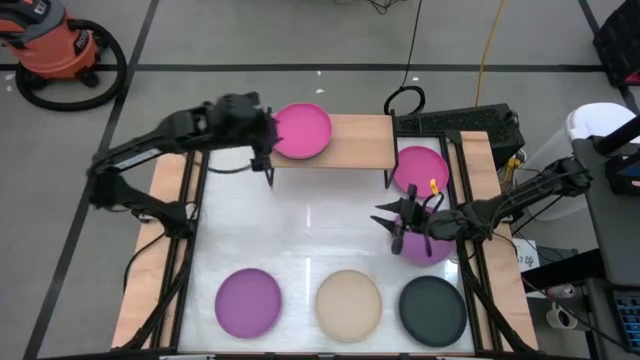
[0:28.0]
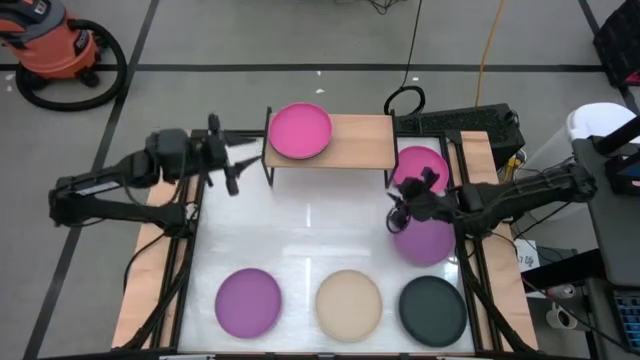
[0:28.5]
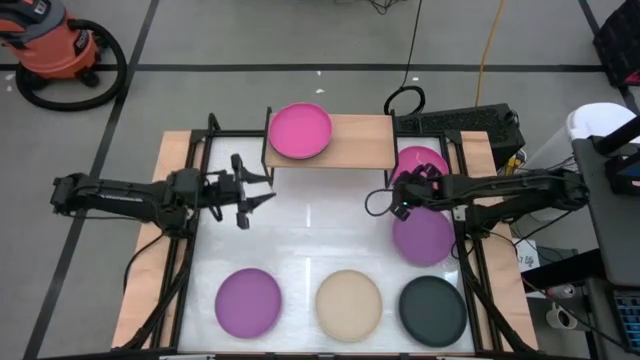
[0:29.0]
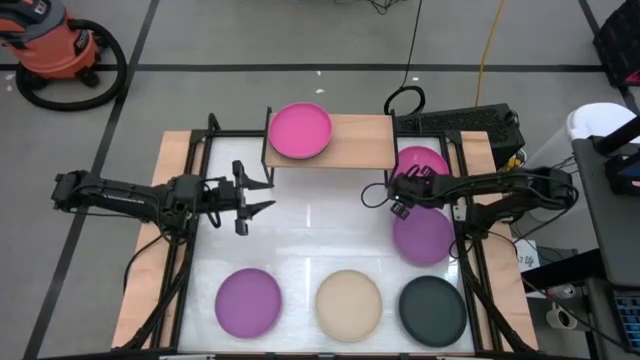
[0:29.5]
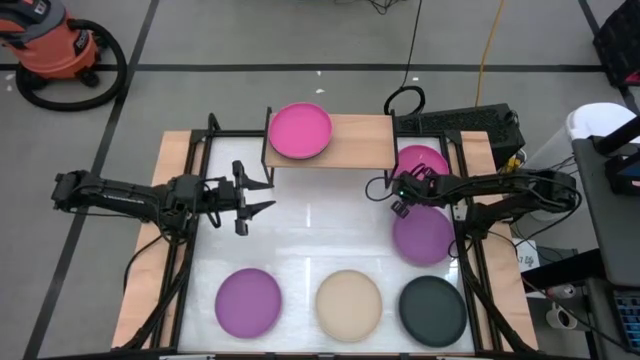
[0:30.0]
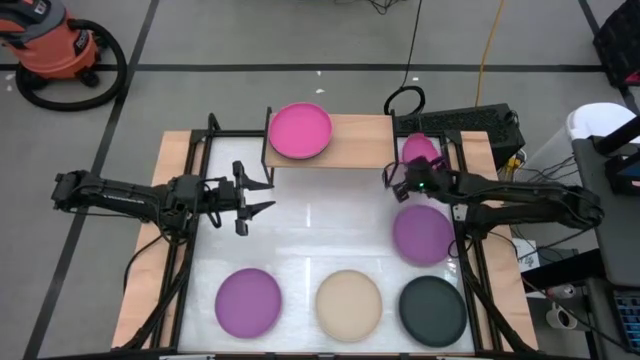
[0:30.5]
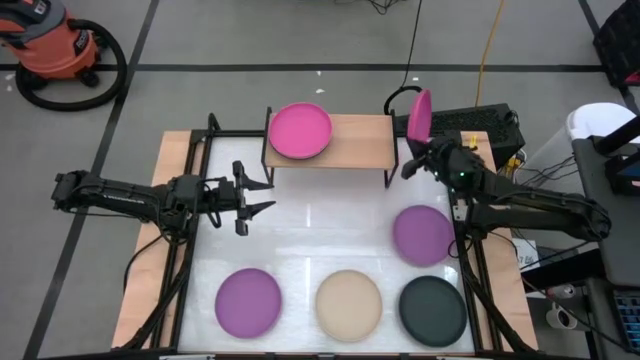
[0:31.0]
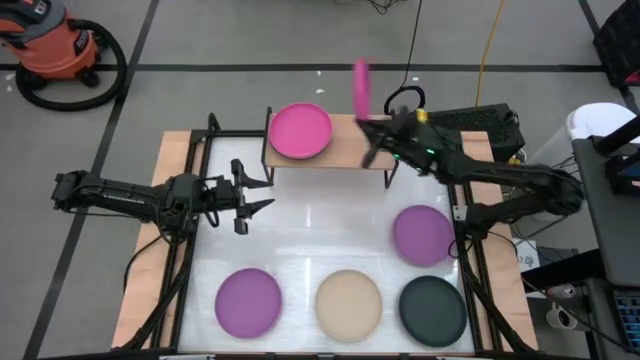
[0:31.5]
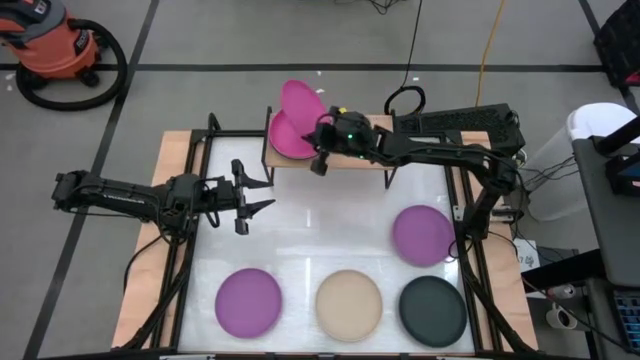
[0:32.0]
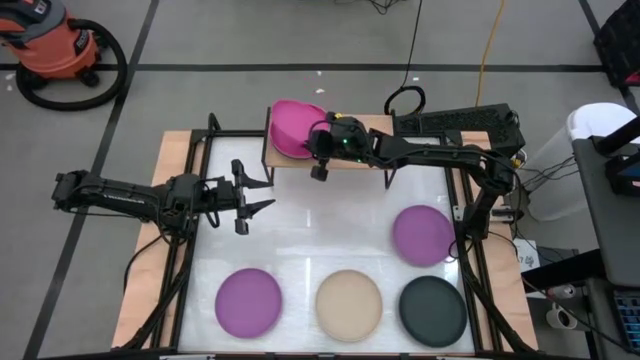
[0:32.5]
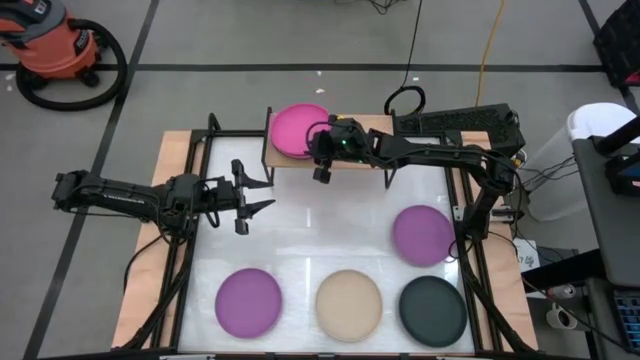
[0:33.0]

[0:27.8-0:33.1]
Task: Place and stack plates onto a shelf
Stack the pink plate on top of the pink plate on the shelf

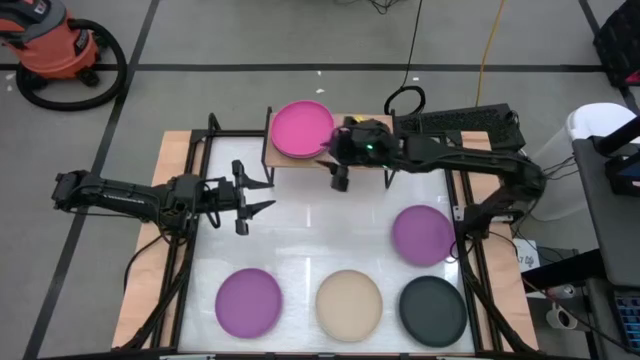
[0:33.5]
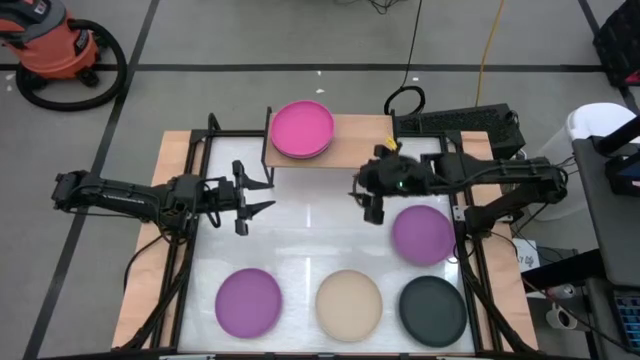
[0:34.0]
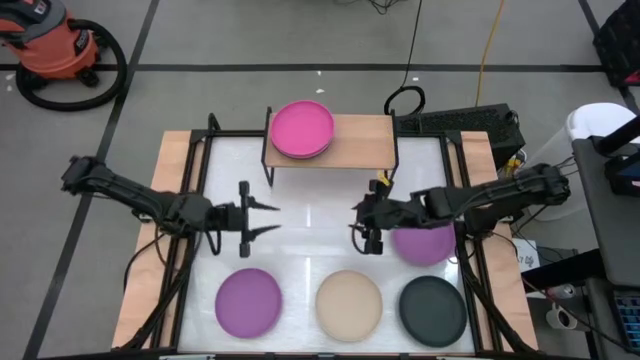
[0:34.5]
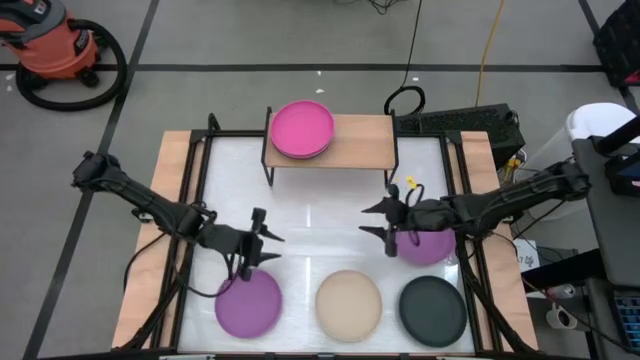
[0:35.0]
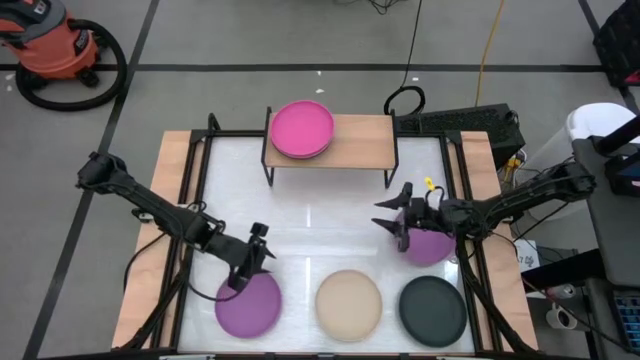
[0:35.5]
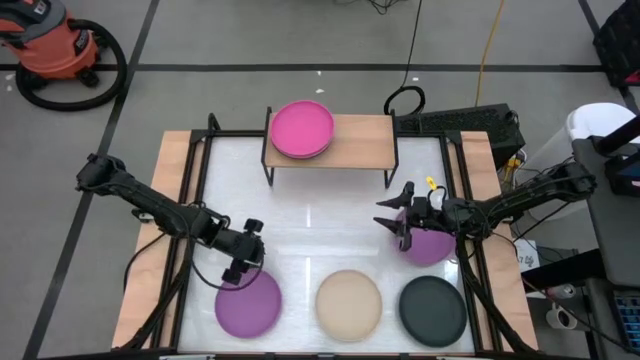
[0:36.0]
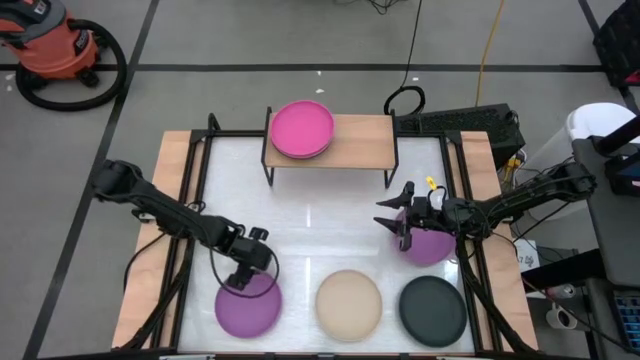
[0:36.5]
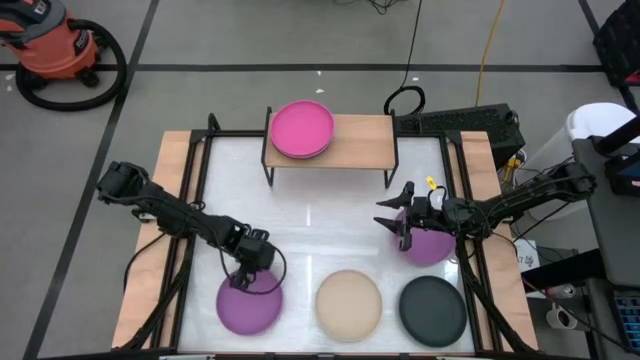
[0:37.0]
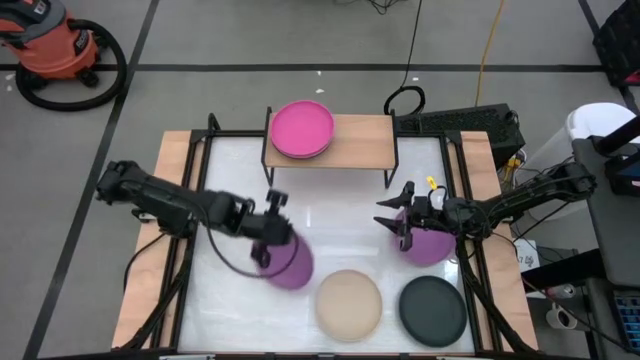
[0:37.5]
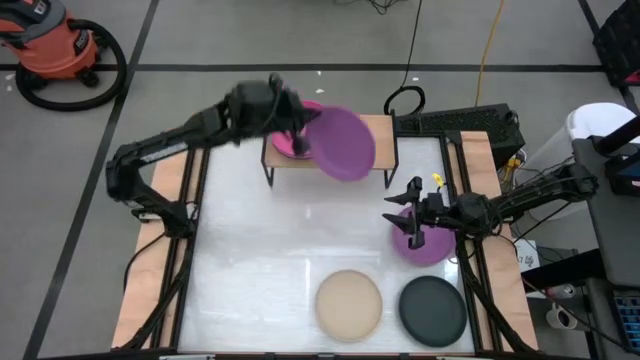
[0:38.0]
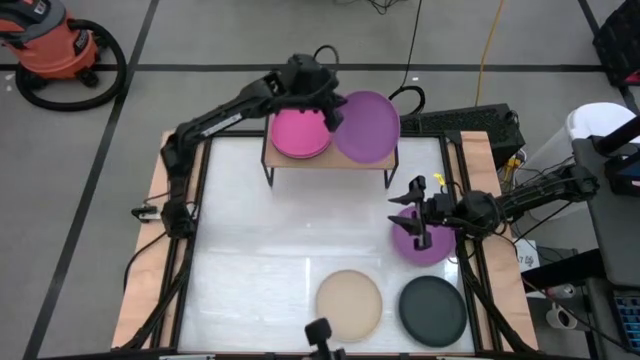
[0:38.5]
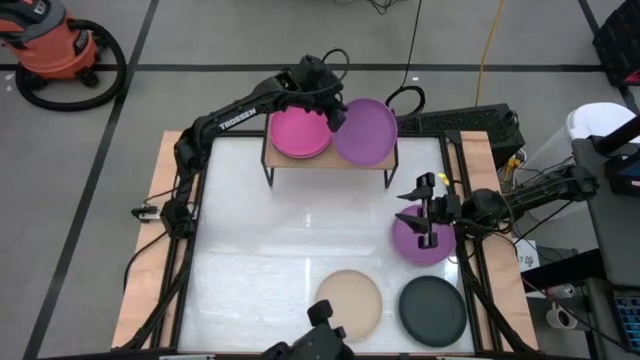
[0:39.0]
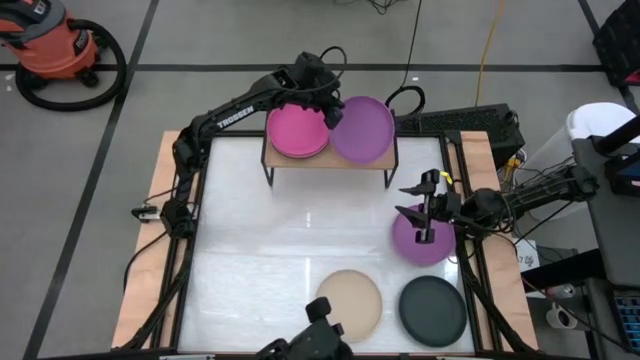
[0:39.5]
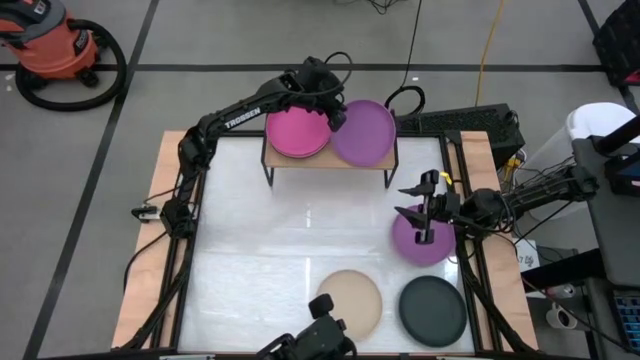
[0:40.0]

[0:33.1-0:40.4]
Put the bottom violet plate on the shelf

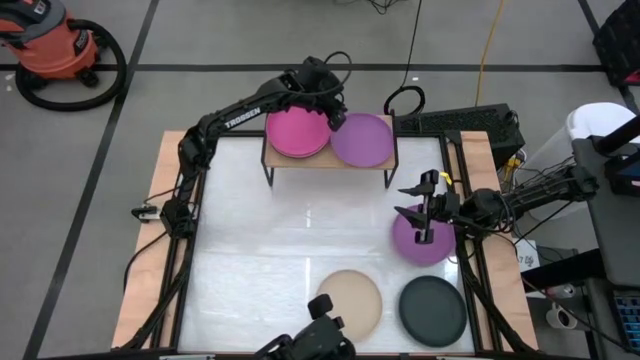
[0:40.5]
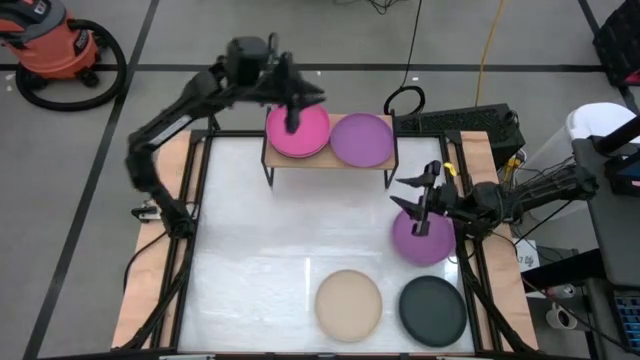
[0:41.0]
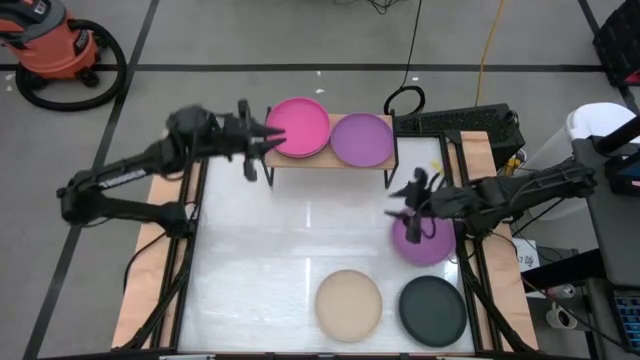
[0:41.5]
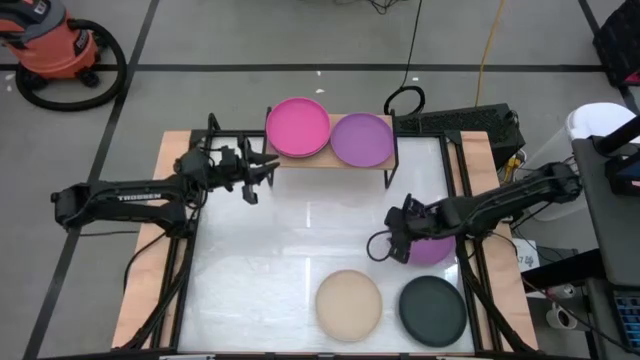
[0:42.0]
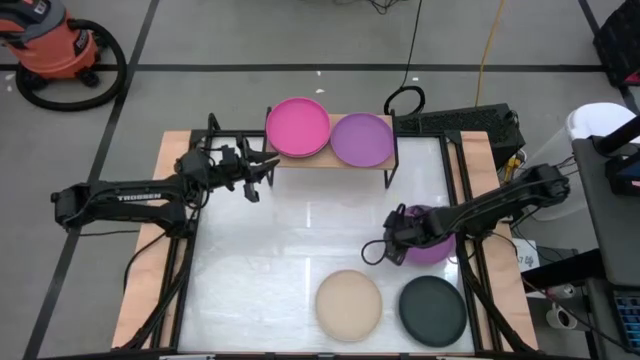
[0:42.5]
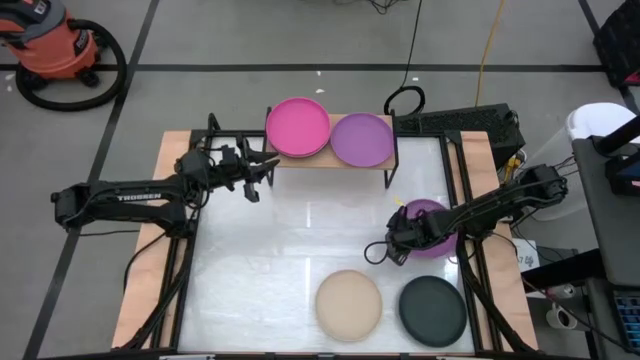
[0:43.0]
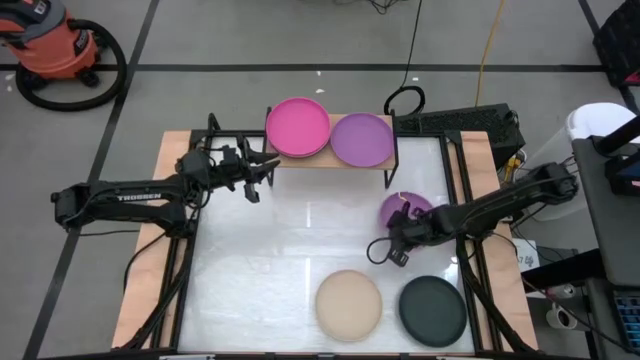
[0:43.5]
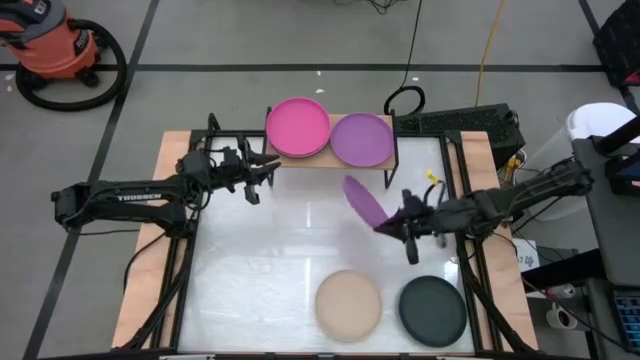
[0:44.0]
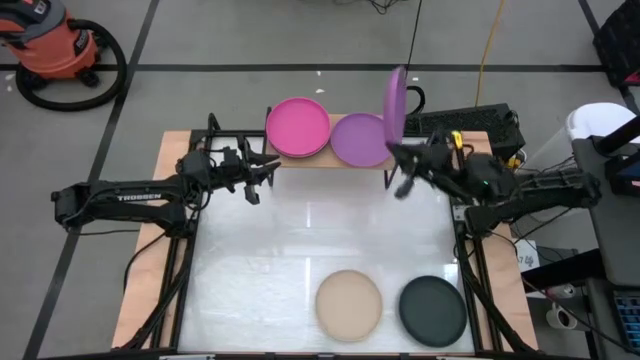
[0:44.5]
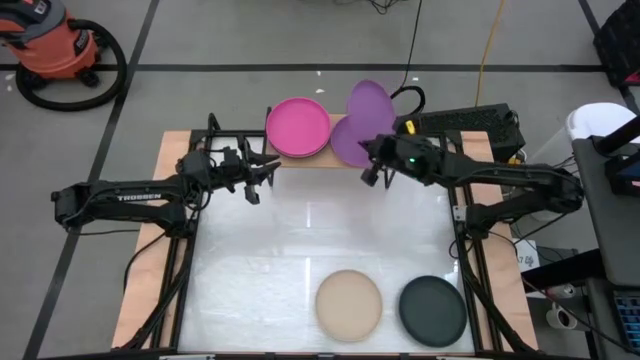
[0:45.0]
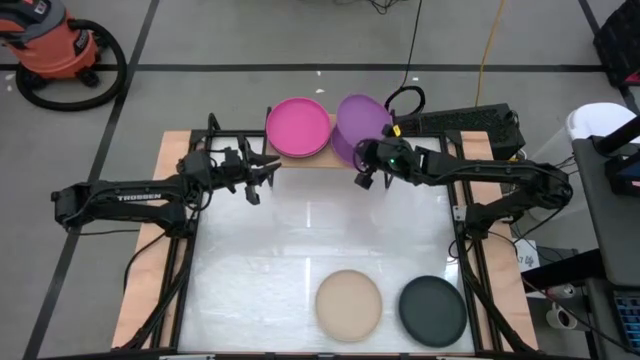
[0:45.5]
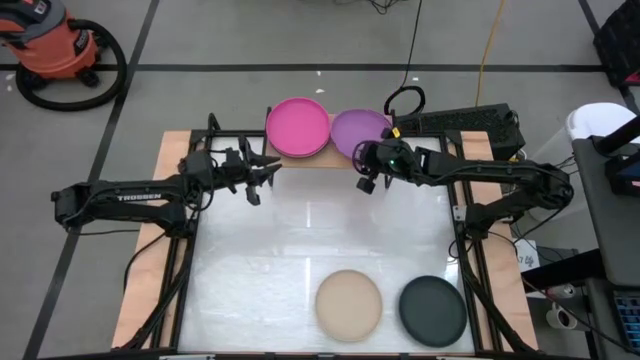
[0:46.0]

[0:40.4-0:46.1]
Stack the violet plate on top of the violet plate on the shelf

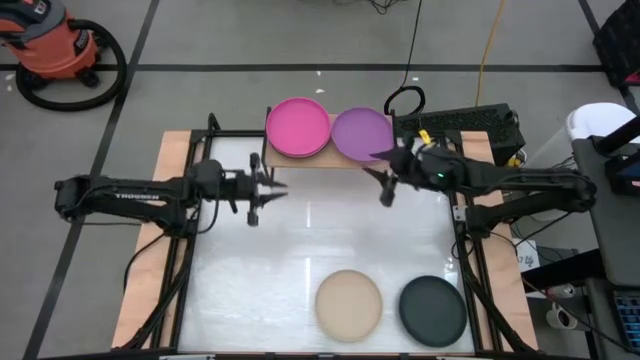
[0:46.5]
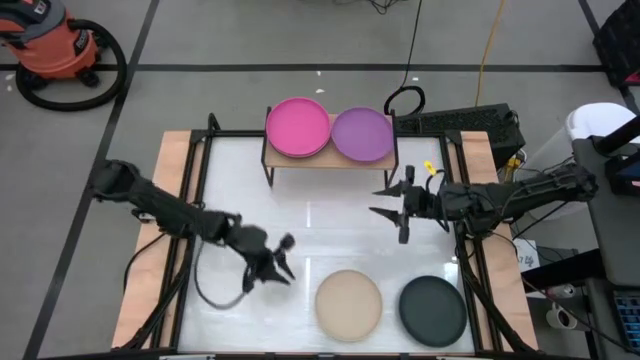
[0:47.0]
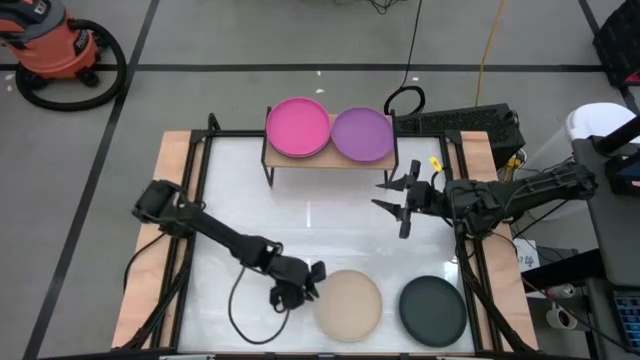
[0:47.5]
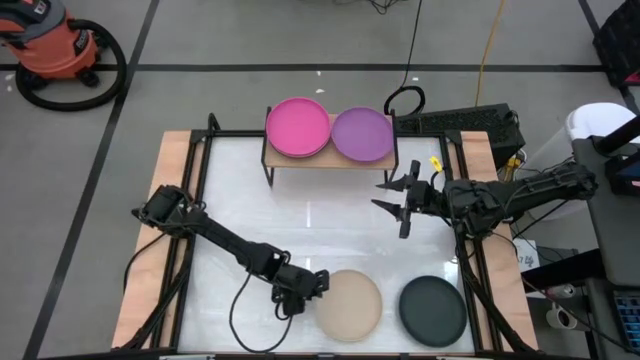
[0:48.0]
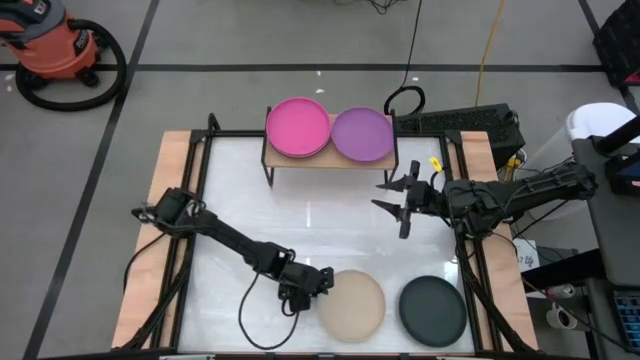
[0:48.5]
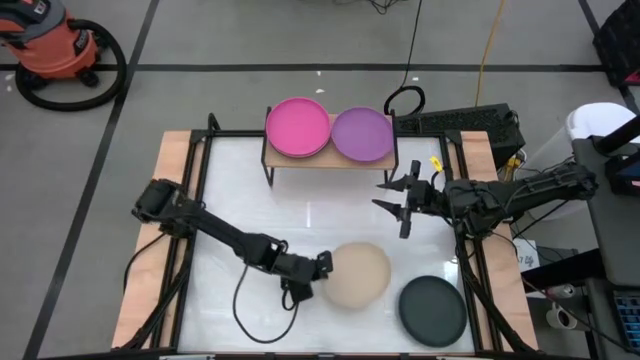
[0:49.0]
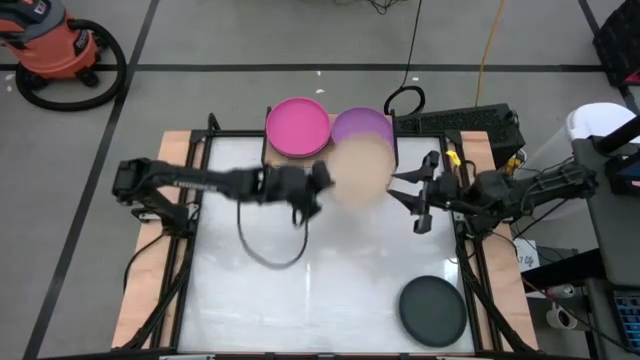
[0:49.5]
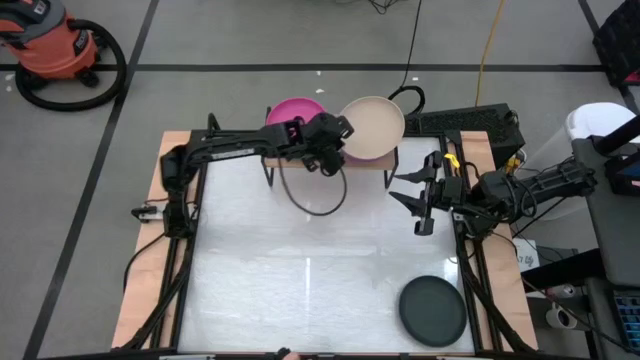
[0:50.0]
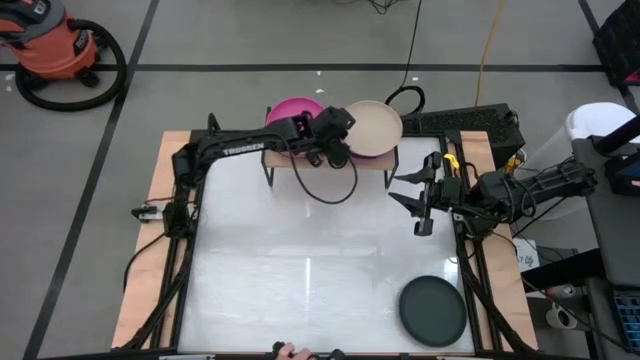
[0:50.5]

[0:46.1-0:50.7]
Stack the light brown plate on top of the violet plate on the shelf
